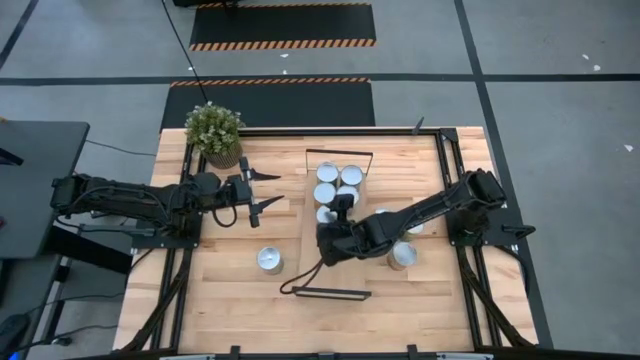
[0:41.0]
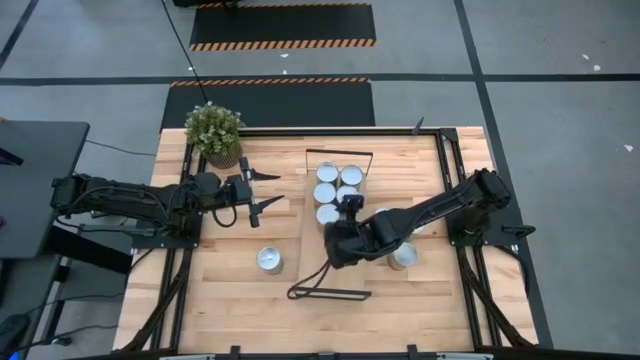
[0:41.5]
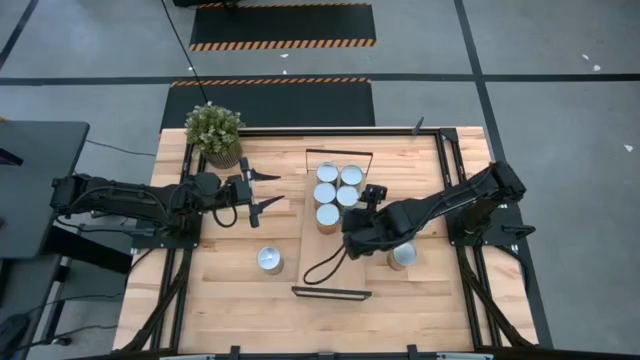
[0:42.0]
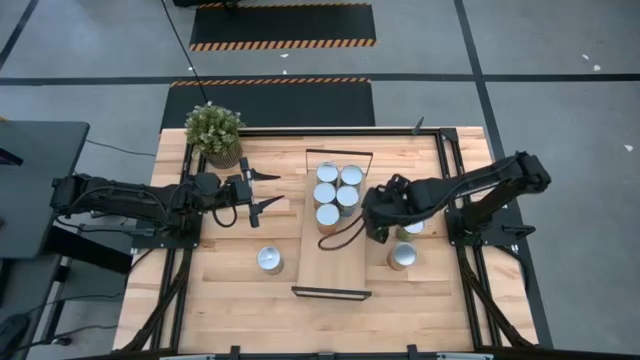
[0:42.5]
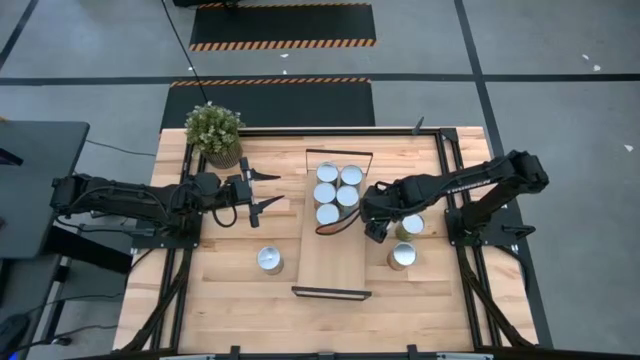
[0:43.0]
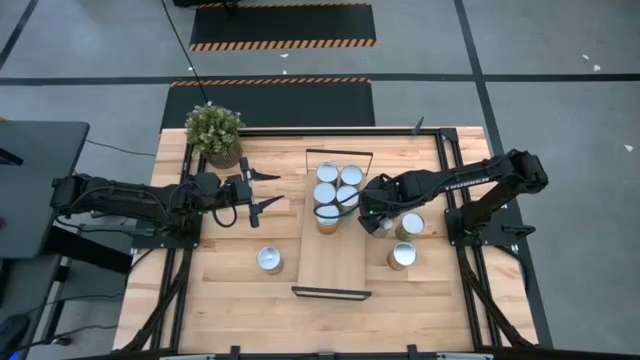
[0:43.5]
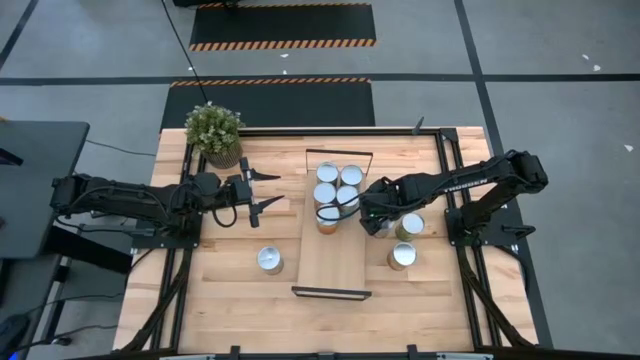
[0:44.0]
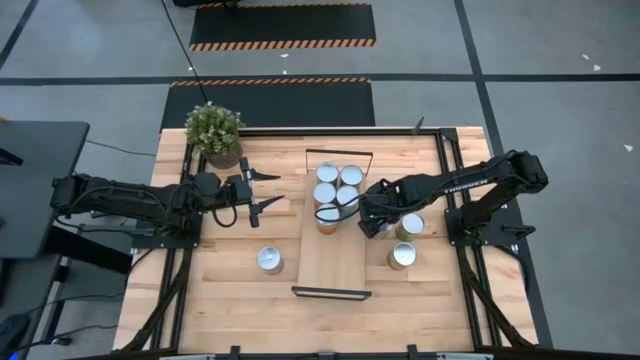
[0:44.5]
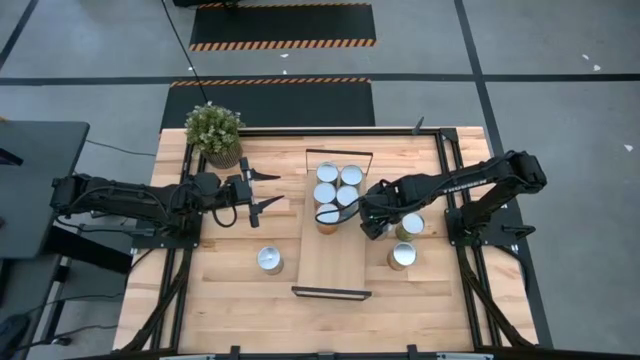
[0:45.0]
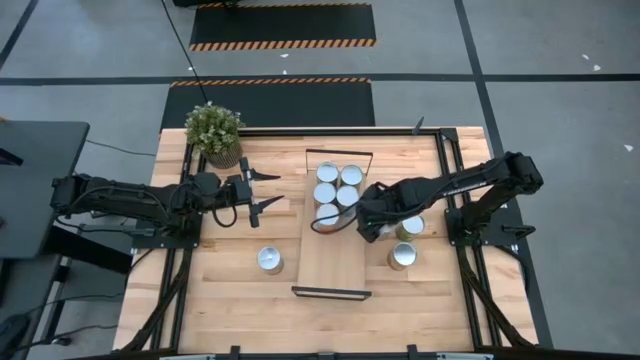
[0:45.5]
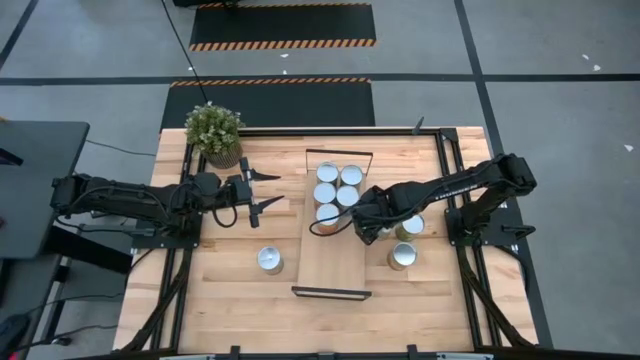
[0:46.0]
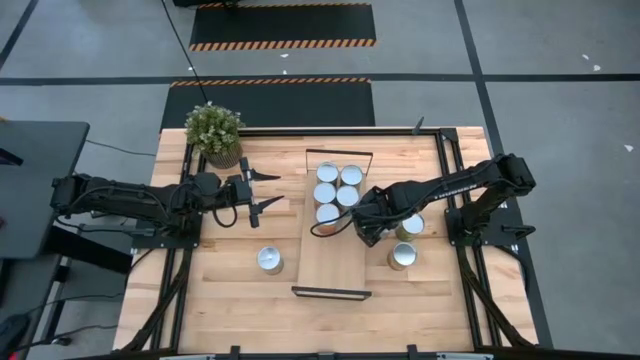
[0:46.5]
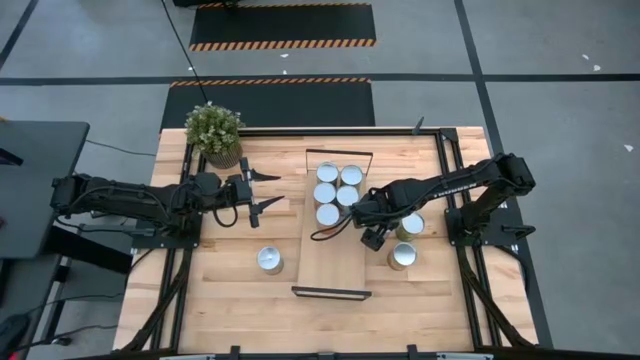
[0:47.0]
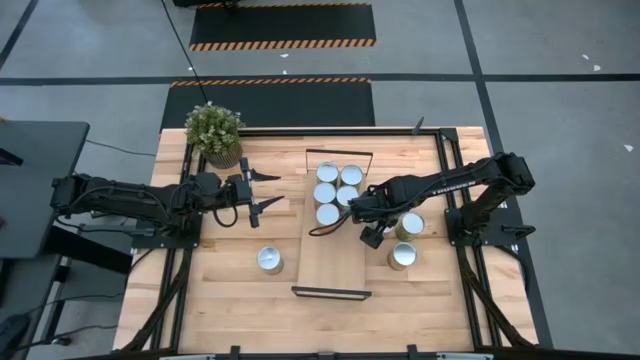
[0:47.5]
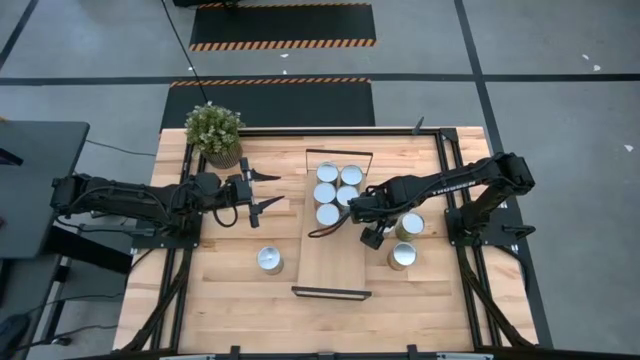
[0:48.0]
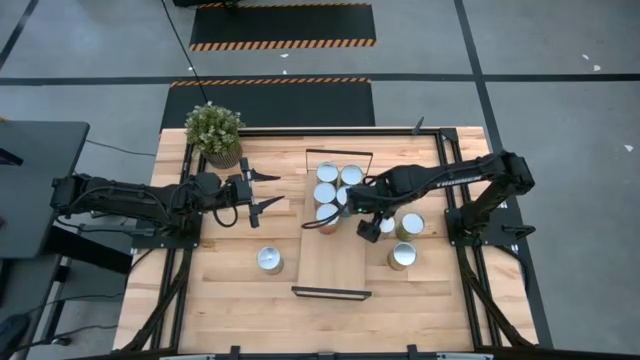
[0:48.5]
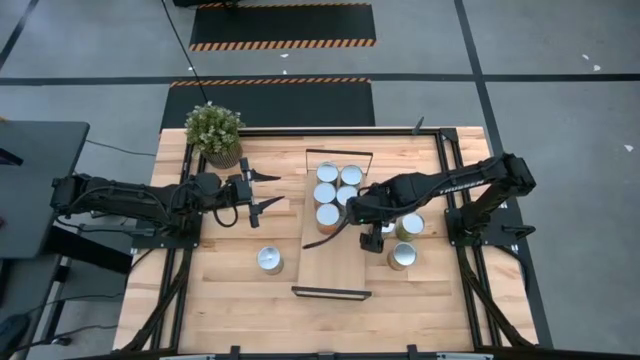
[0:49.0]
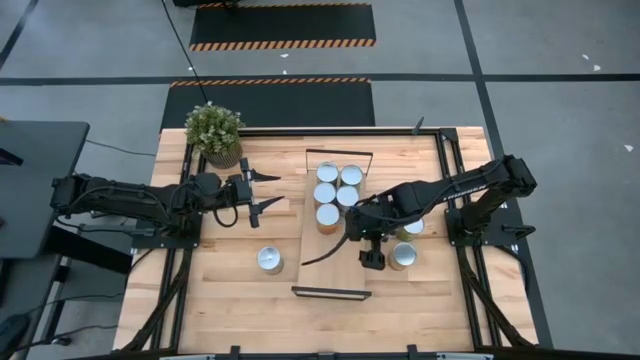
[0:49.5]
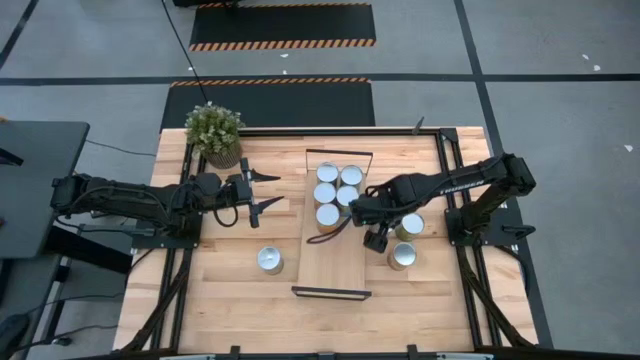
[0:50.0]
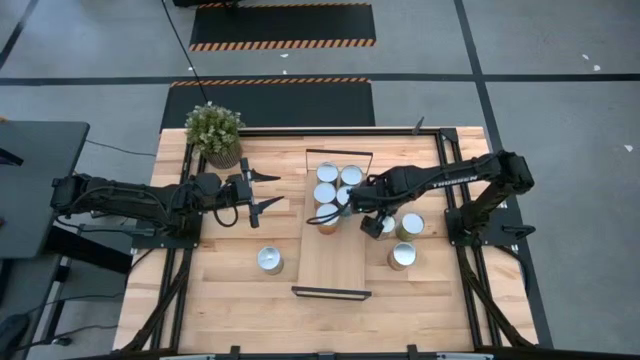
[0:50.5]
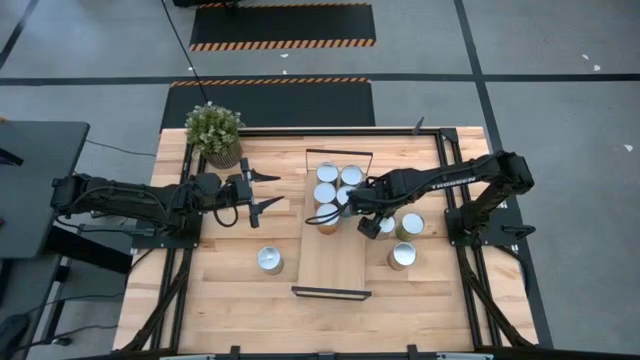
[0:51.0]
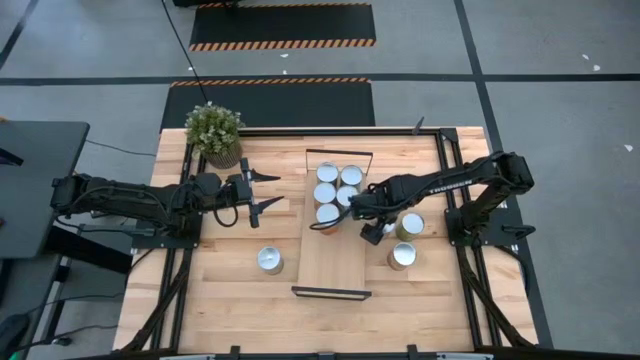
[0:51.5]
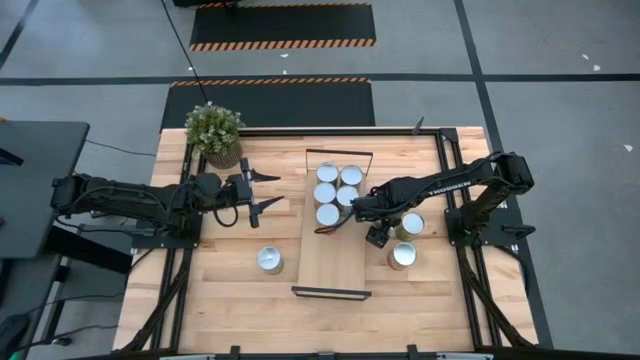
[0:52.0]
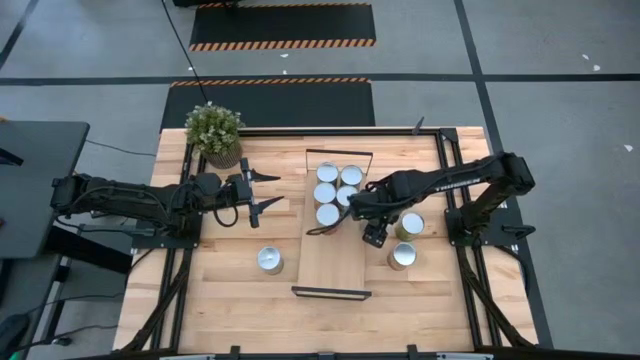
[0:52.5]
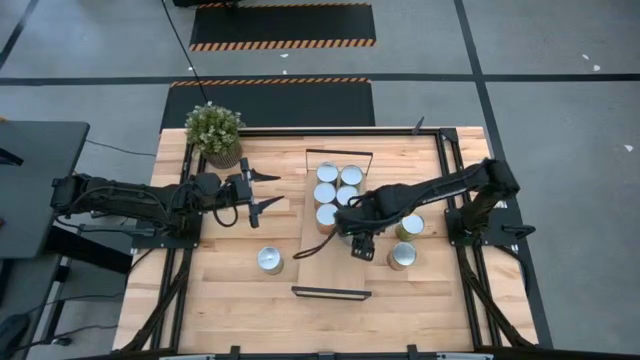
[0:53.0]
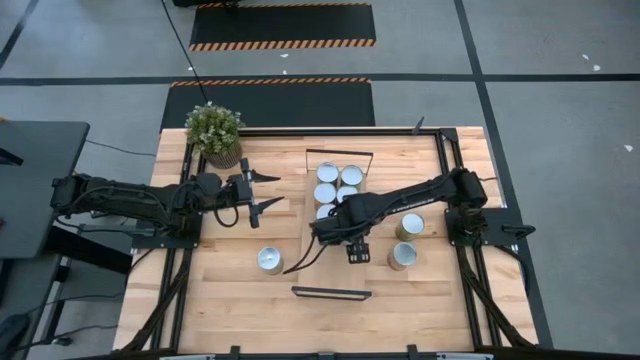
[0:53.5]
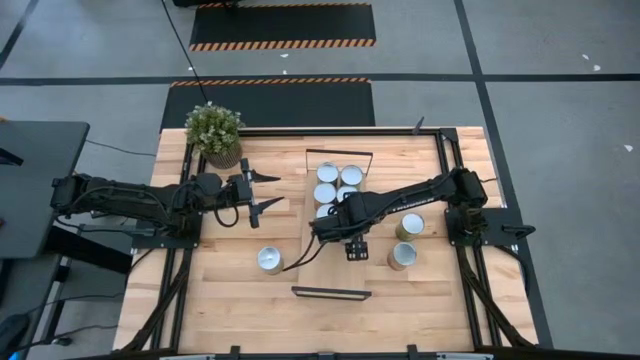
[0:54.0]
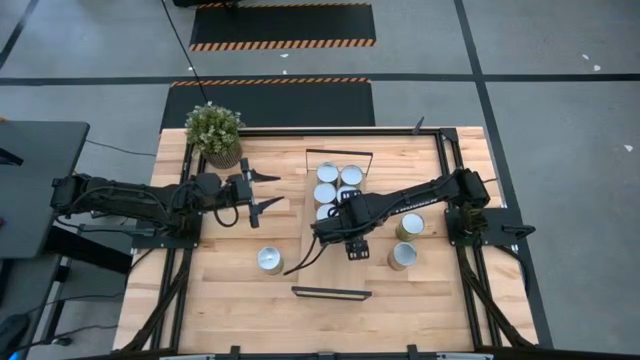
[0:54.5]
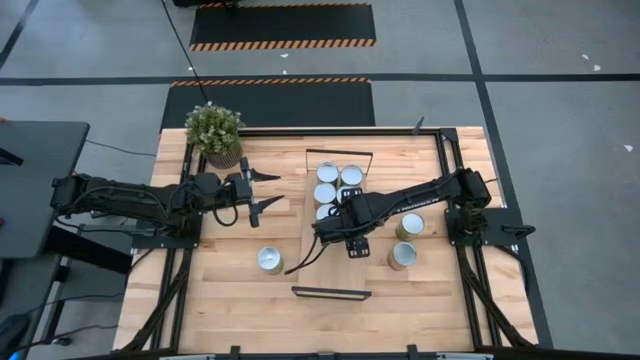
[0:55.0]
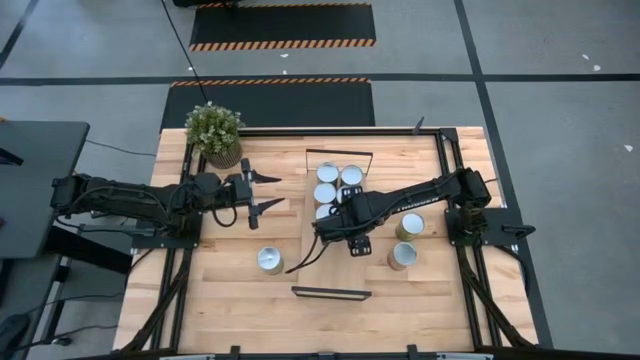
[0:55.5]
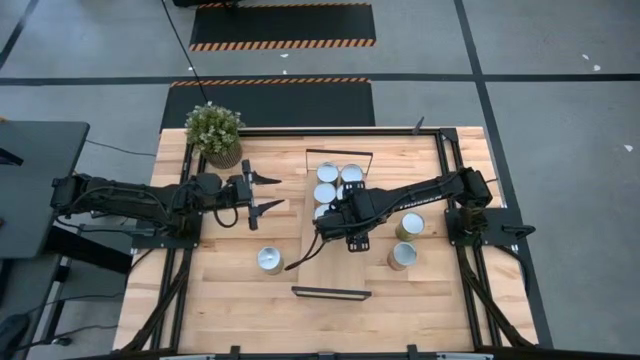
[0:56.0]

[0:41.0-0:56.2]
Task: Pick and place cans onto a shelf
Put the canned peaches on the shelf

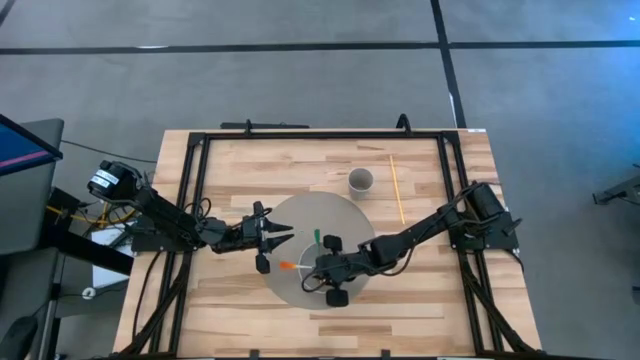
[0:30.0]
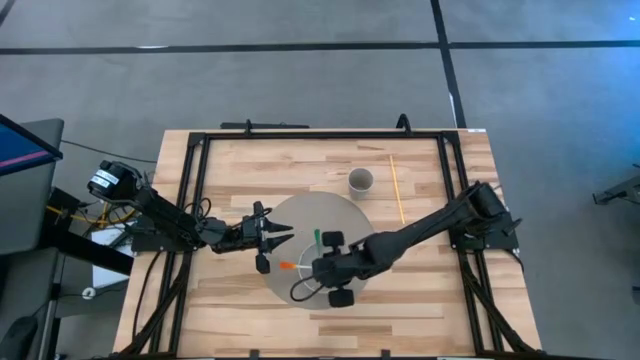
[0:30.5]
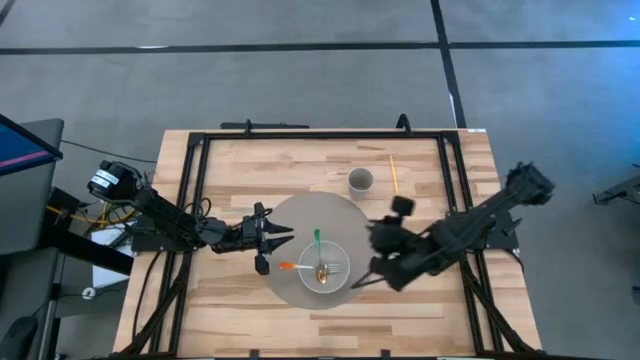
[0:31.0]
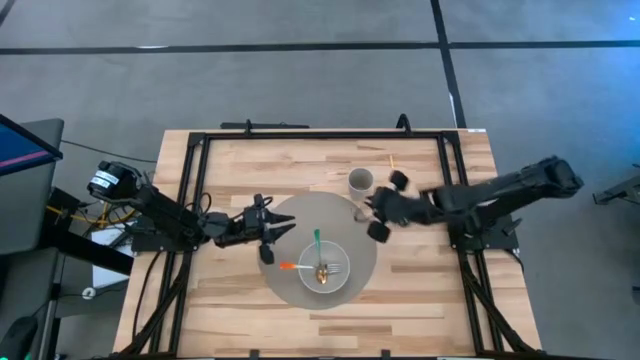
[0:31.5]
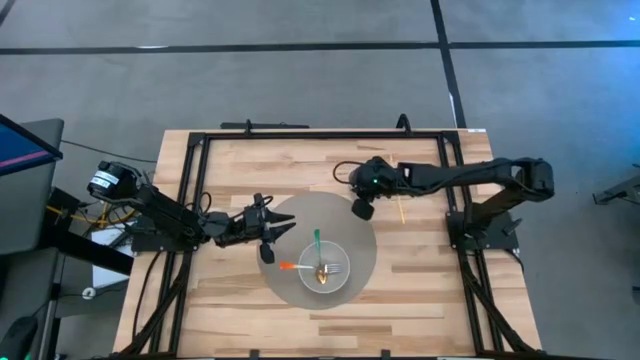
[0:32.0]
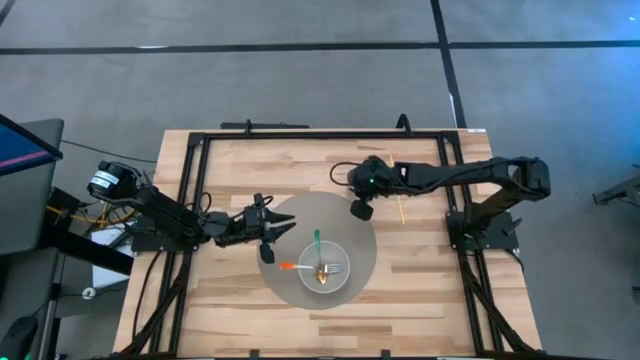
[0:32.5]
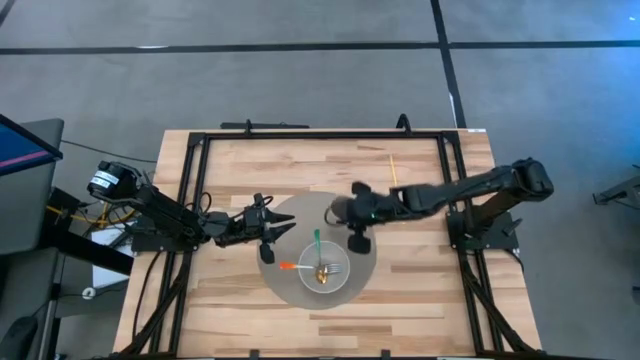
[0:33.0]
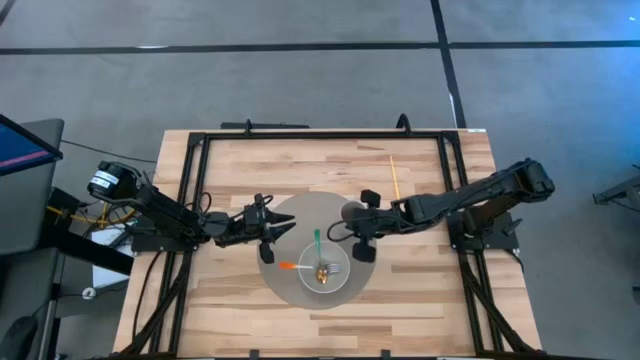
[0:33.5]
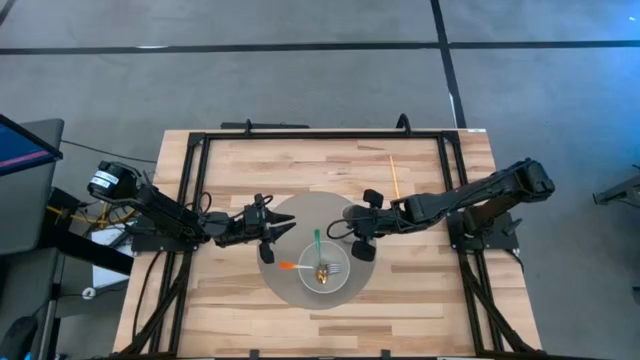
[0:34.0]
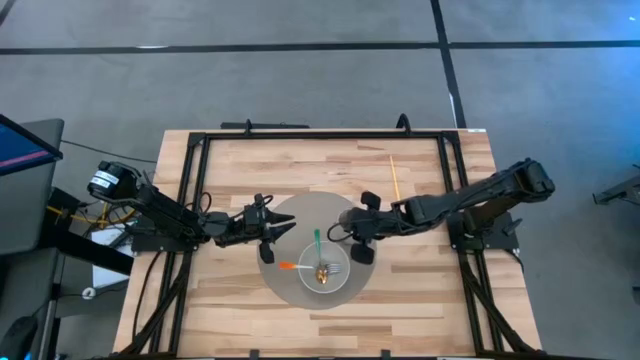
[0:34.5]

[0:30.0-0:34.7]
Task: Pick & Place Utensil
Put the gray cup on the gray table mat
